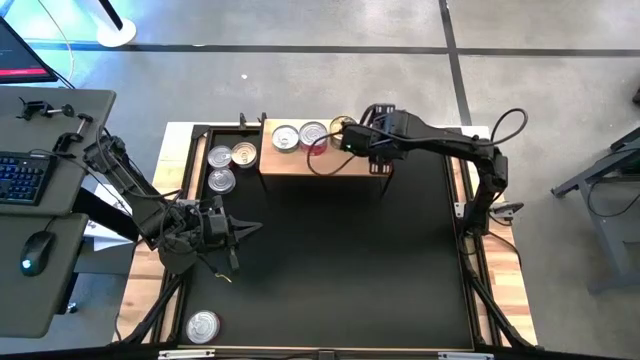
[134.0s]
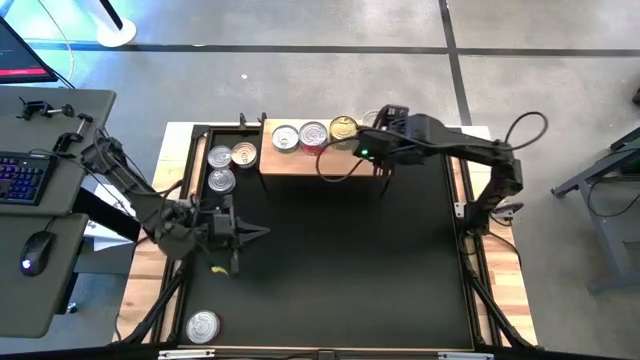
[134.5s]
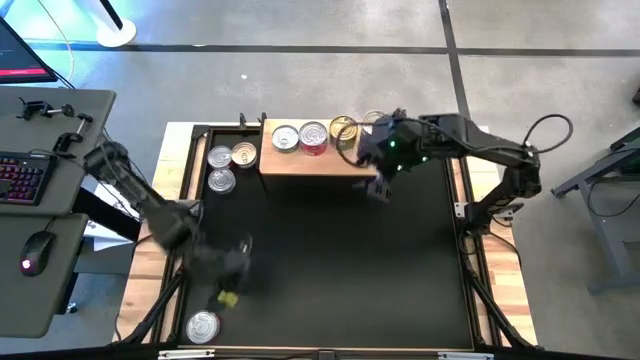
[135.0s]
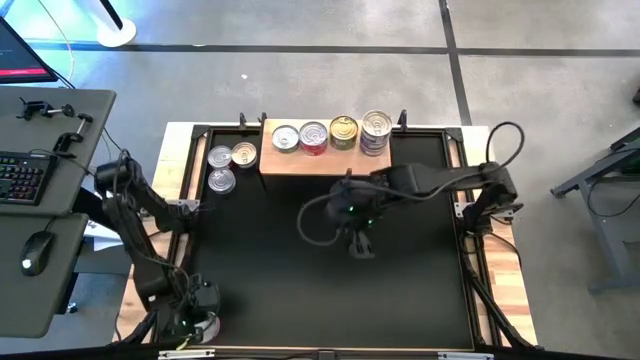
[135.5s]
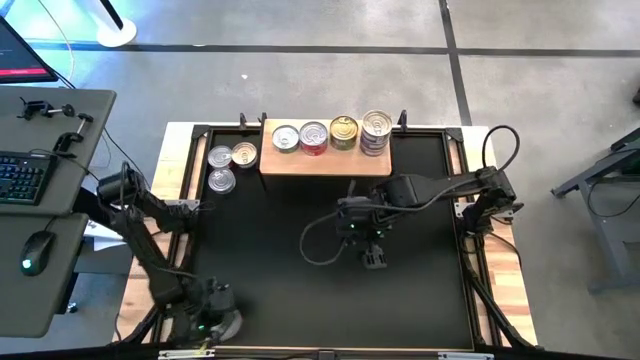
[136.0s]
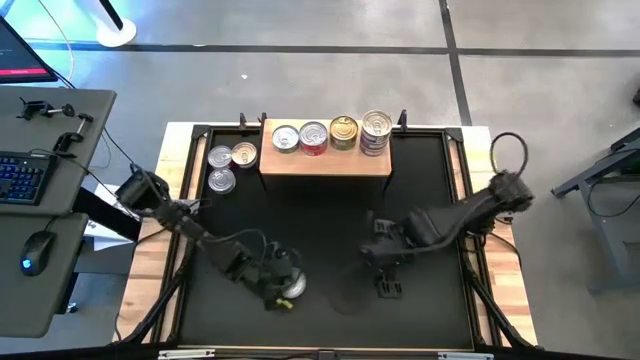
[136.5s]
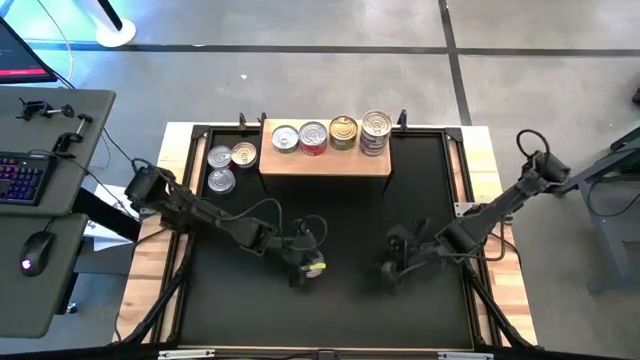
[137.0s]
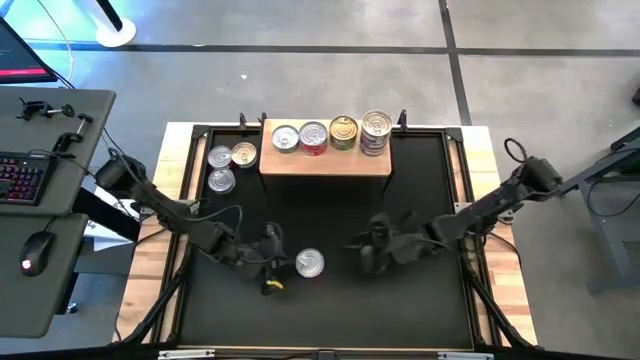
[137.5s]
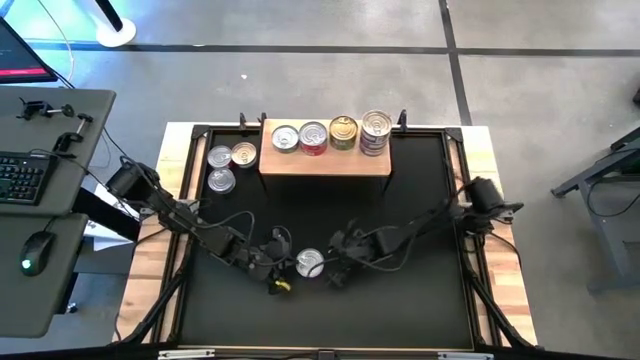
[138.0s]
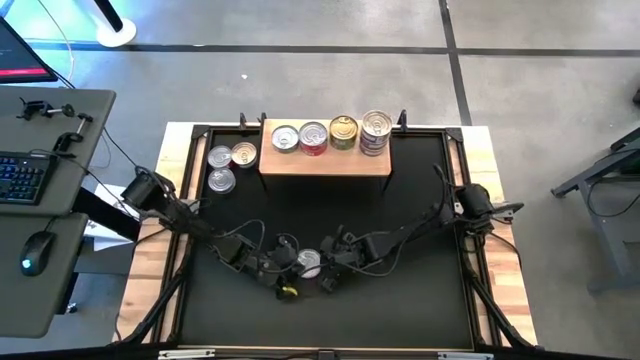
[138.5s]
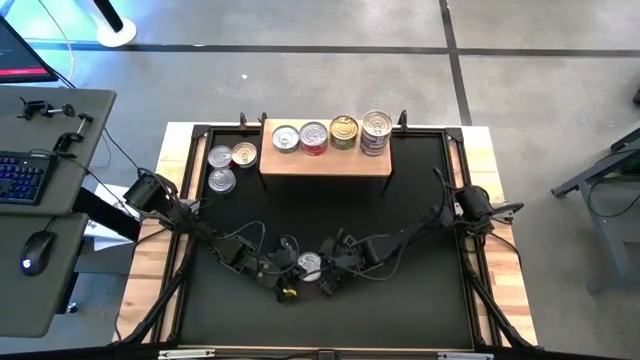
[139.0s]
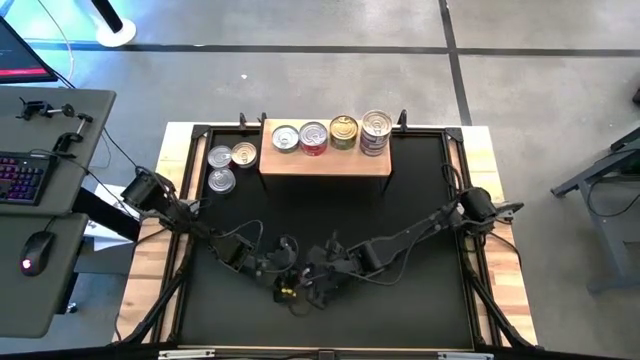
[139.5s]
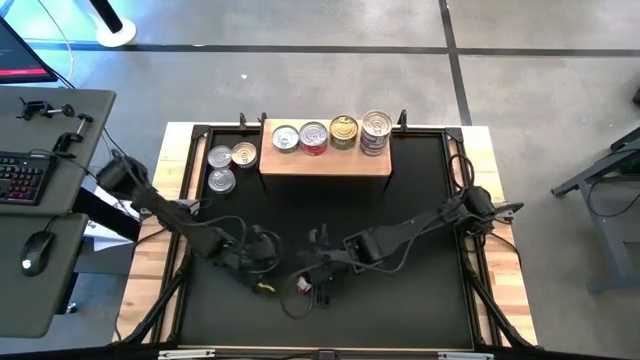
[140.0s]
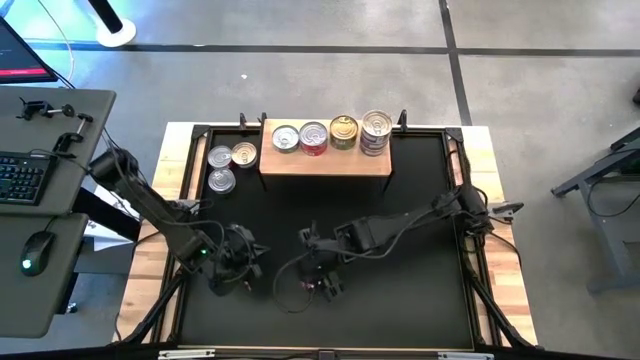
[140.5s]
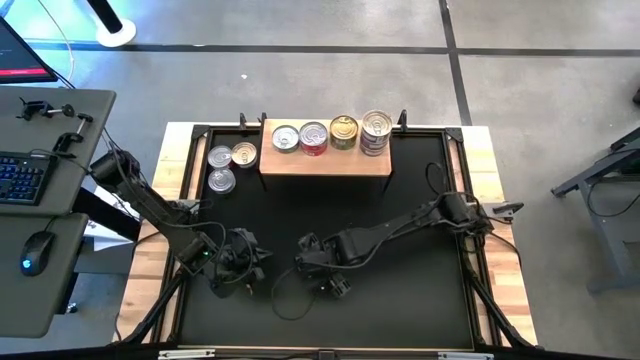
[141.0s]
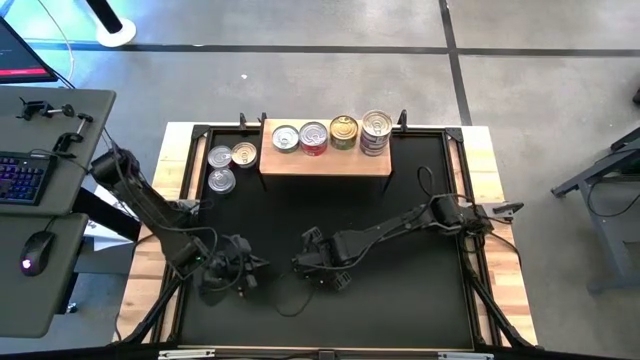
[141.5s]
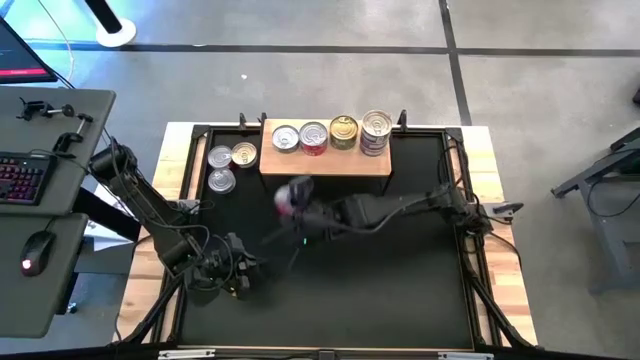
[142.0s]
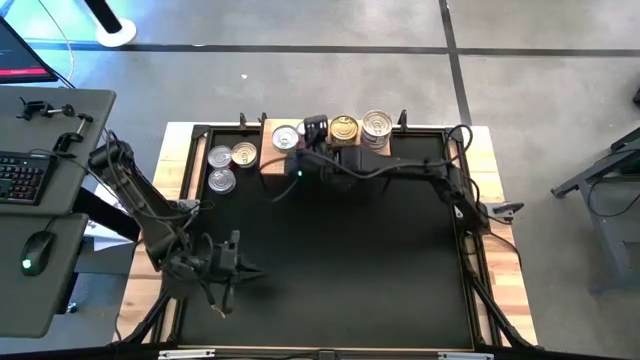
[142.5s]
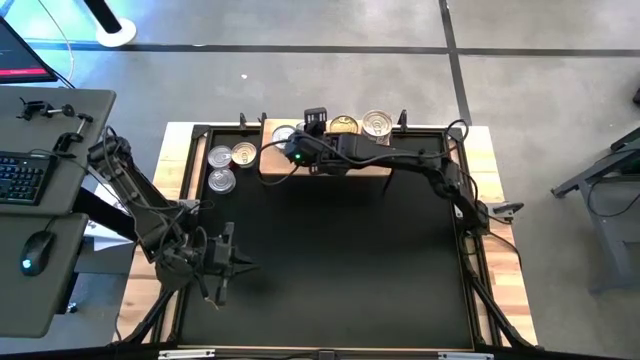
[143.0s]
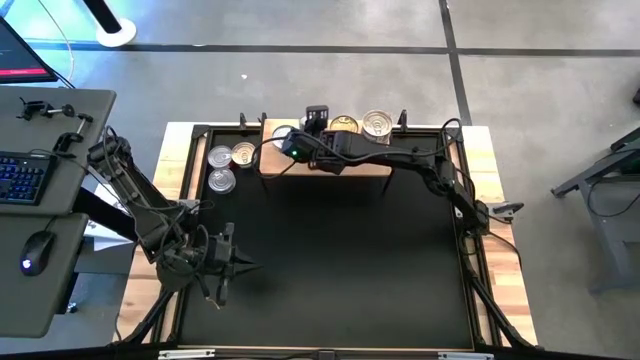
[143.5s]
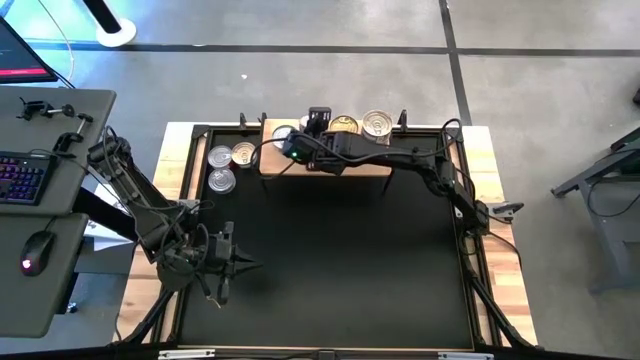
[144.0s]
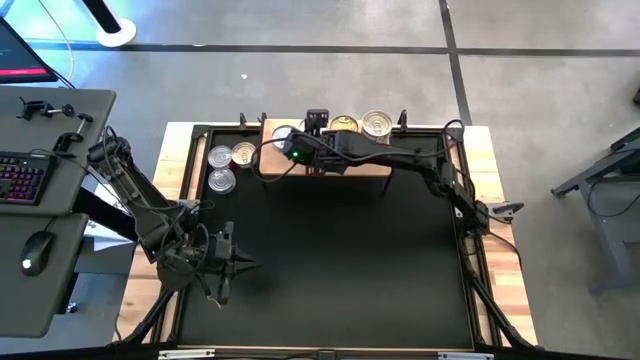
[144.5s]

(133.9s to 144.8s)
Task: Stack canned seafood by type on shelf
Stack the red tuna can on top of the other red tuna can

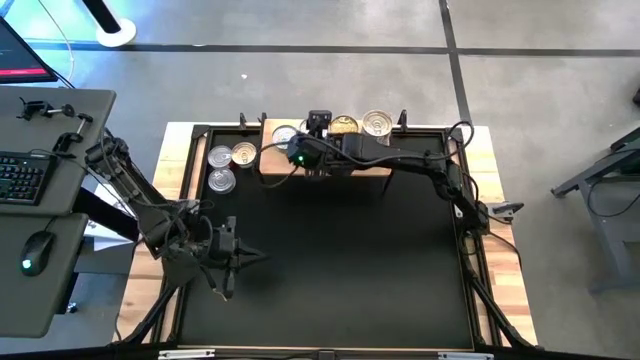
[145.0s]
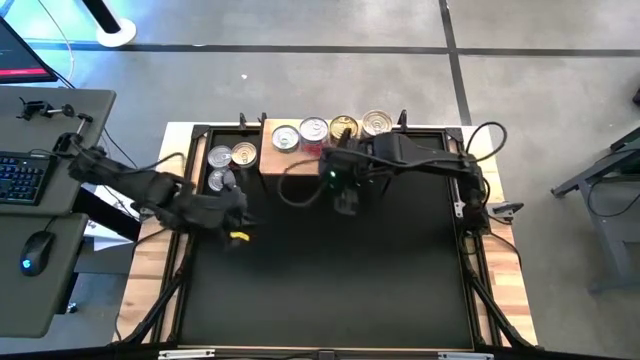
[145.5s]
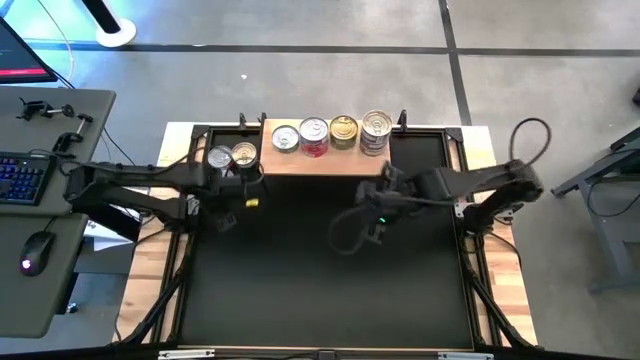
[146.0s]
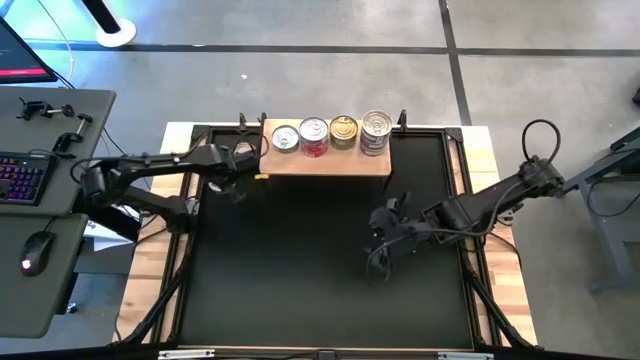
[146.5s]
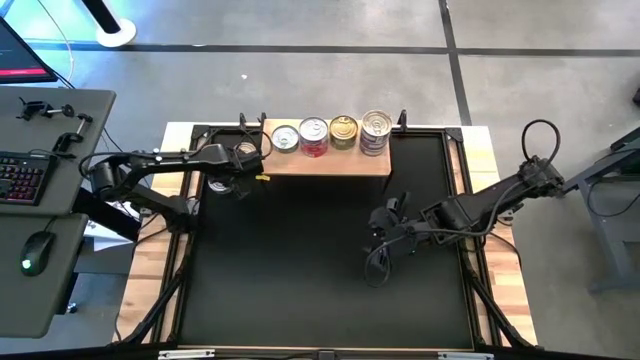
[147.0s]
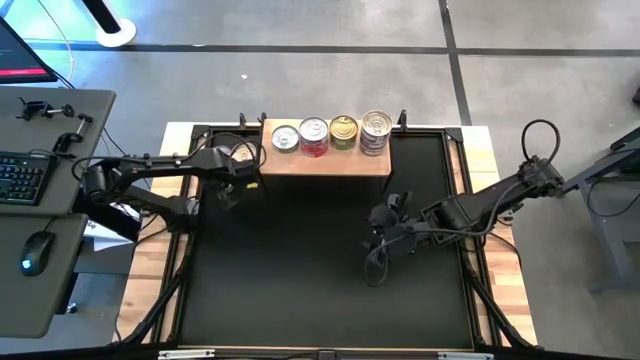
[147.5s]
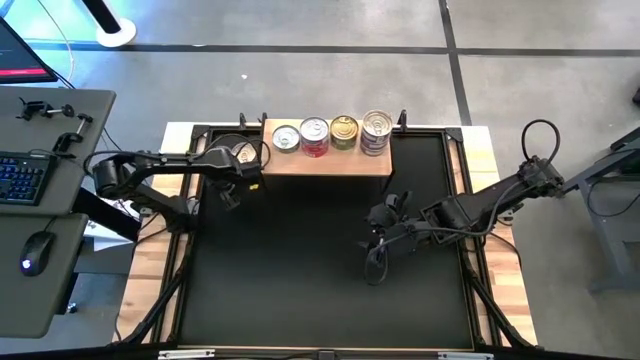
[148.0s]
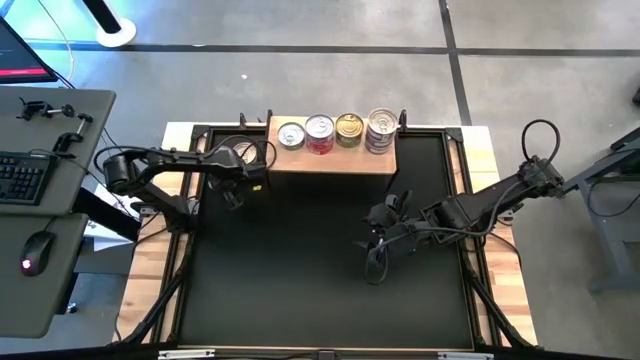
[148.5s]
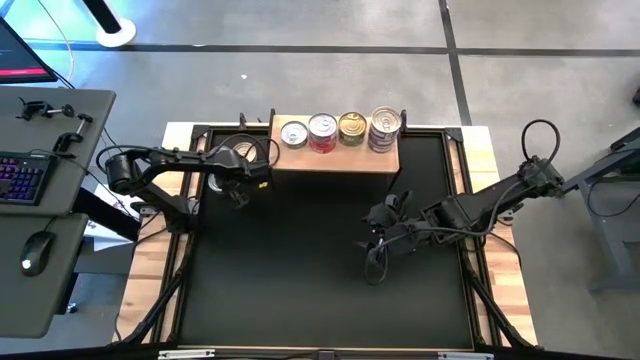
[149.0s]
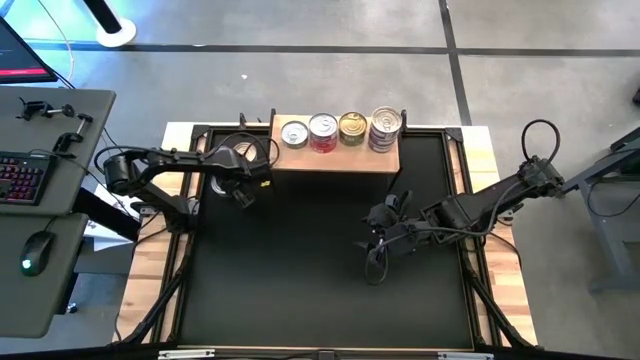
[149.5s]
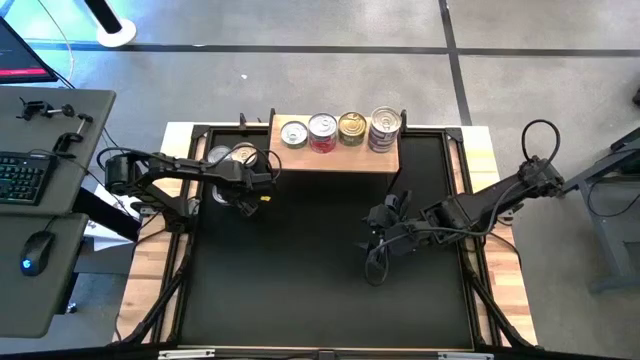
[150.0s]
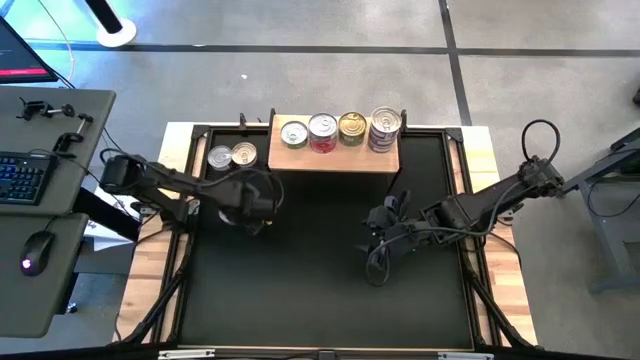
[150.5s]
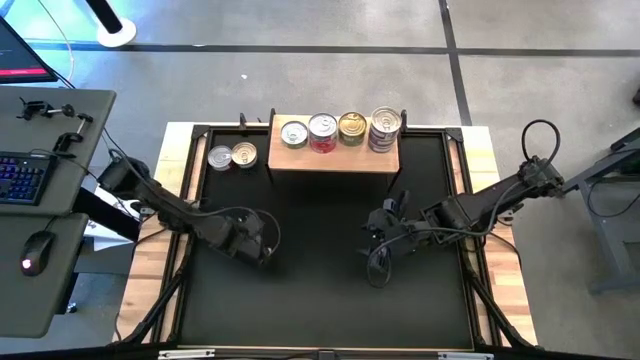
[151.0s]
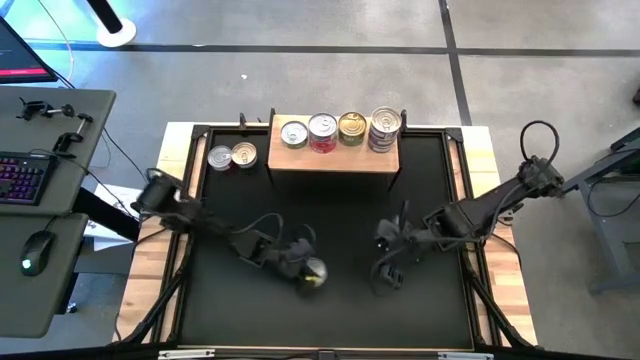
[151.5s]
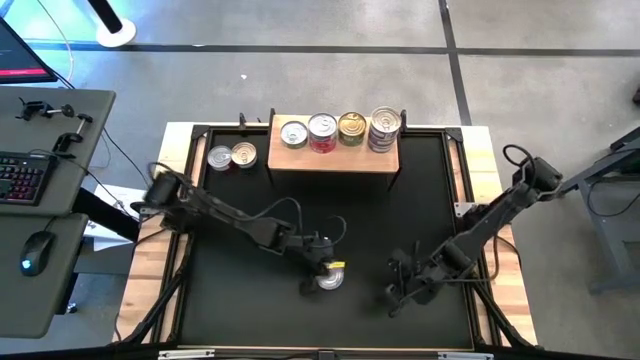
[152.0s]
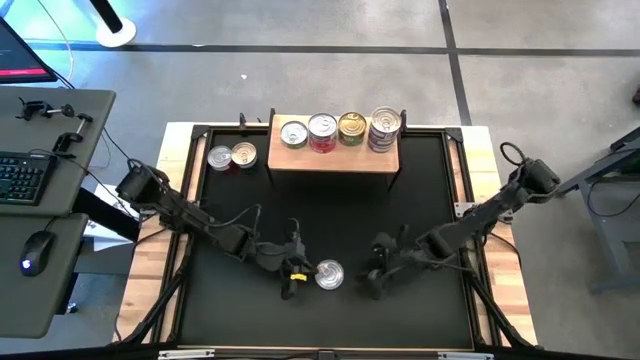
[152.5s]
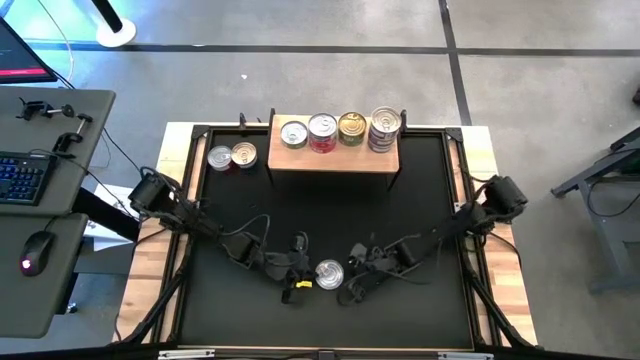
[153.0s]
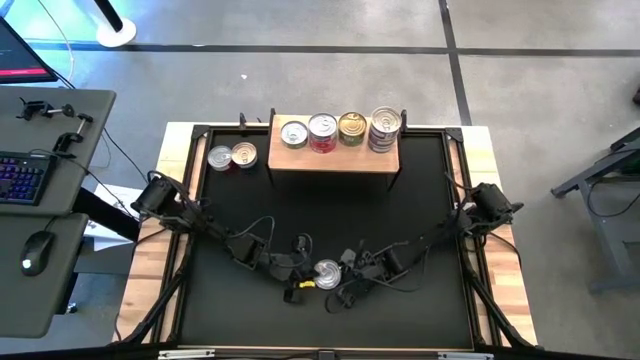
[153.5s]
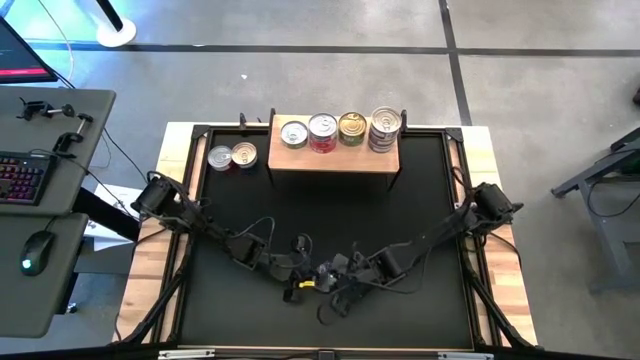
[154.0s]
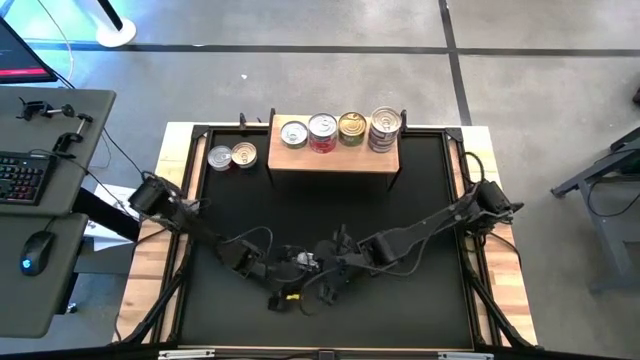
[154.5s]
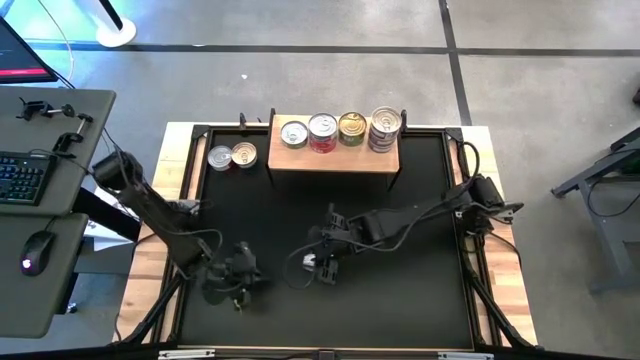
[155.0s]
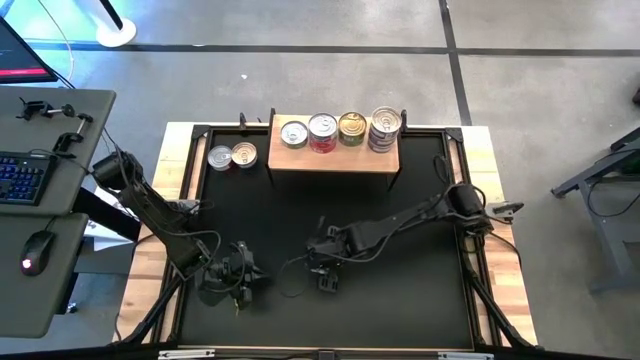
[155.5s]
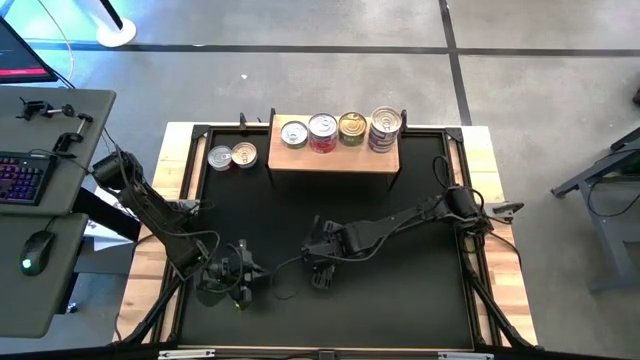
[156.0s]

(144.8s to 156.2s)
Stack the light green tuna can on top of the other light green tuna can

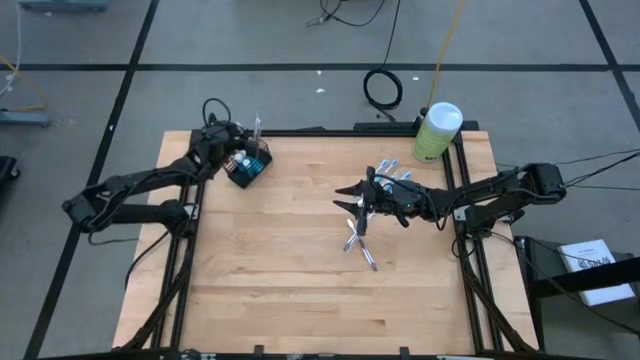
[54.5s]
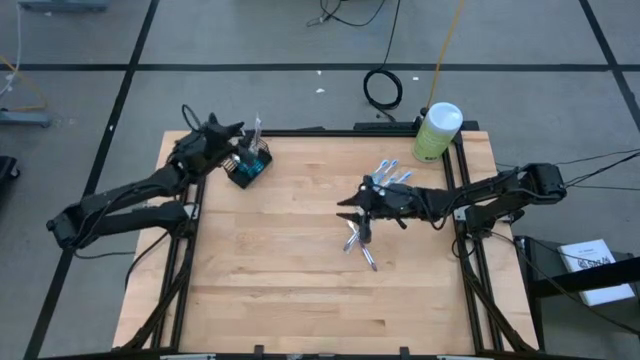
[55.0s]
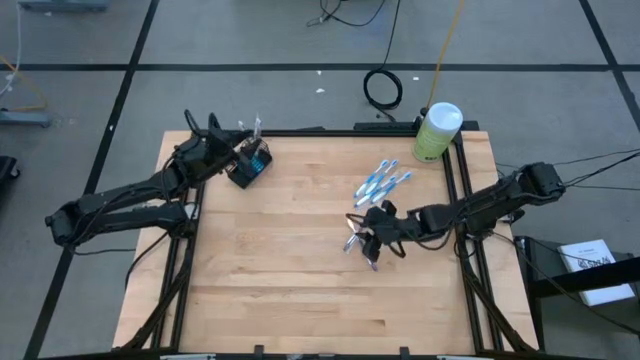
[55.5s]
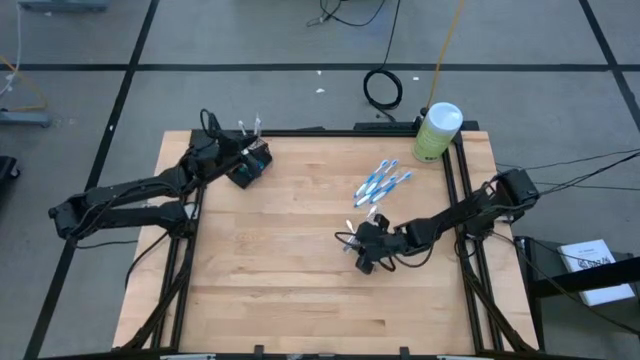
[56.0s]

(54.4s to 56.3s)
Task: Pick & Place toothbrushing station
Put the purple toothbrush into the right compartment of the wire organizer
